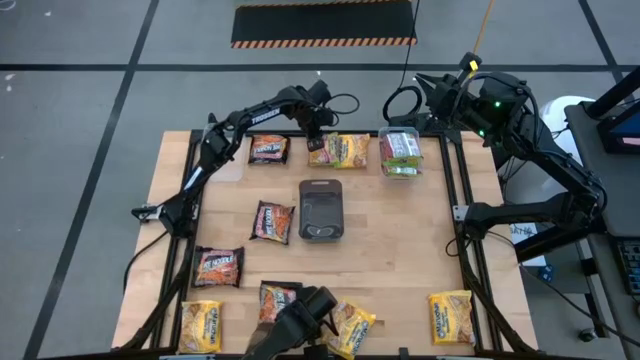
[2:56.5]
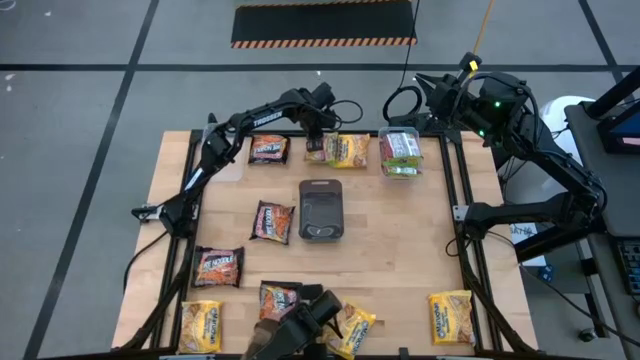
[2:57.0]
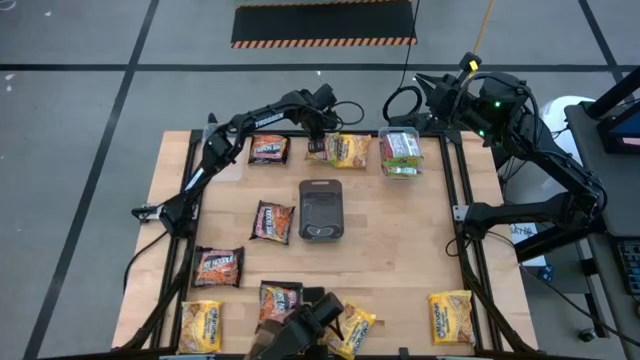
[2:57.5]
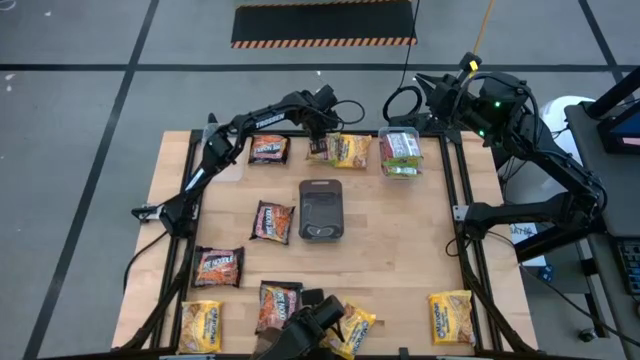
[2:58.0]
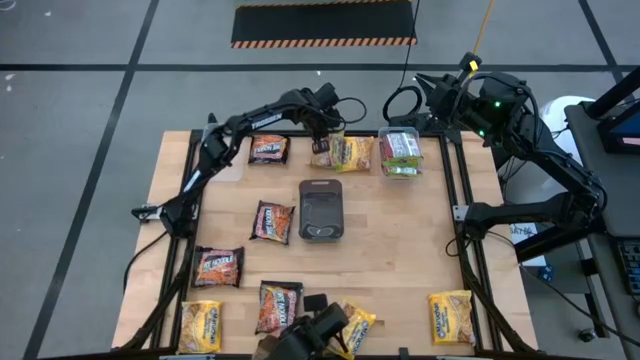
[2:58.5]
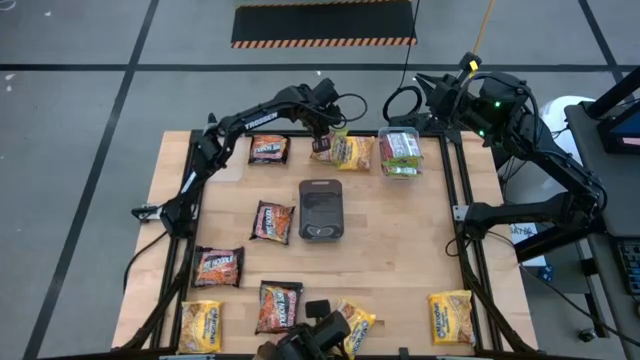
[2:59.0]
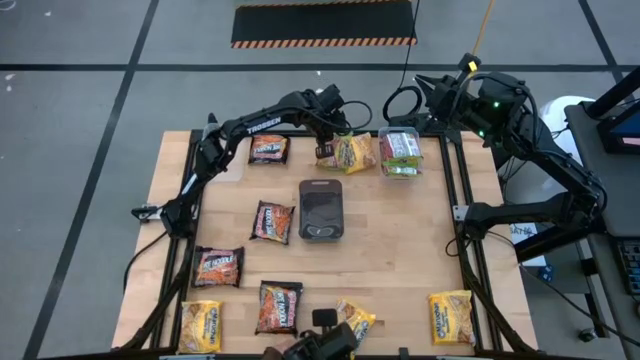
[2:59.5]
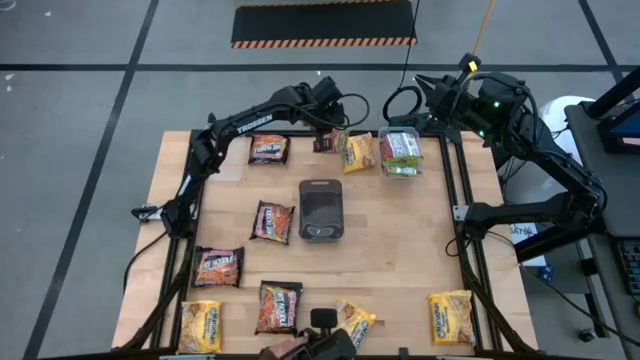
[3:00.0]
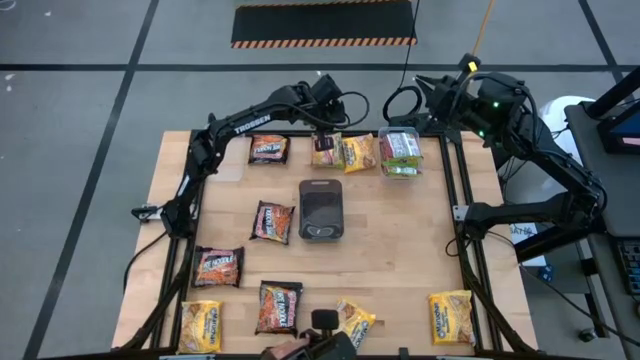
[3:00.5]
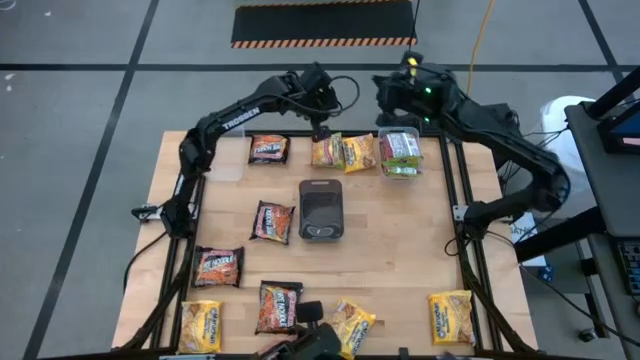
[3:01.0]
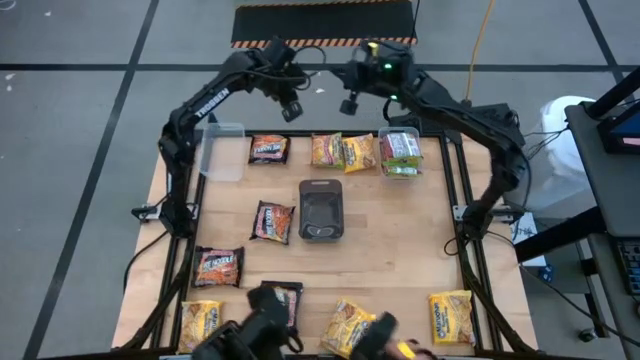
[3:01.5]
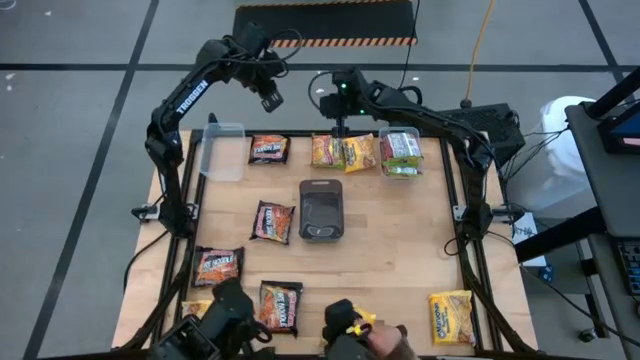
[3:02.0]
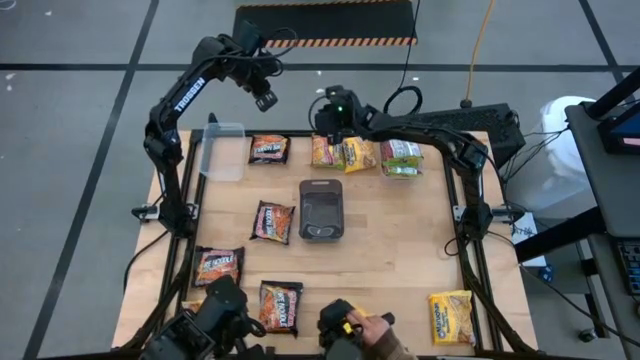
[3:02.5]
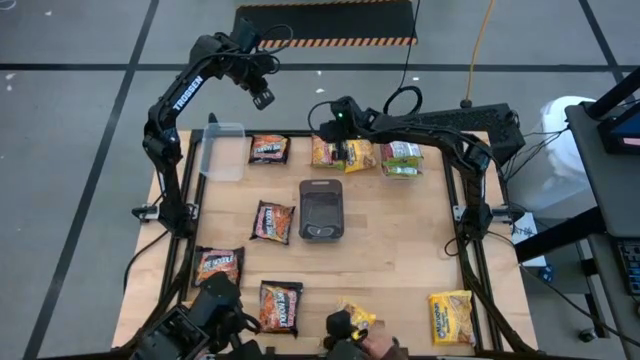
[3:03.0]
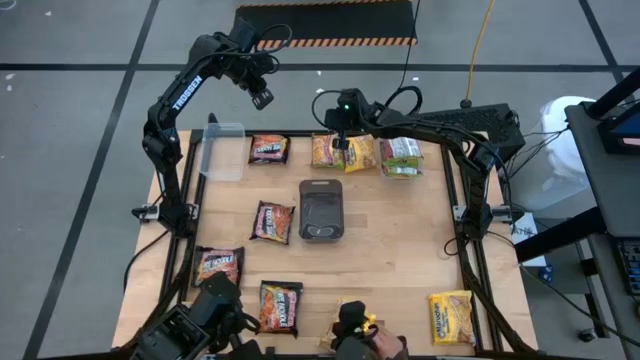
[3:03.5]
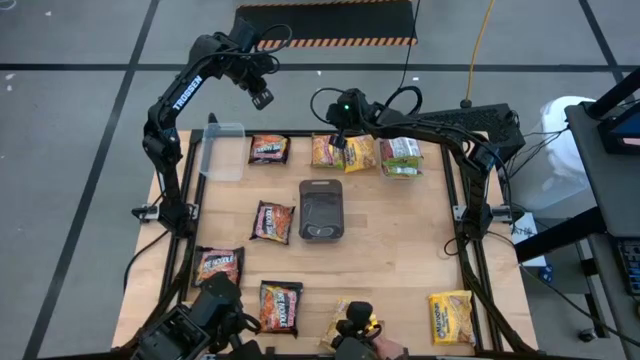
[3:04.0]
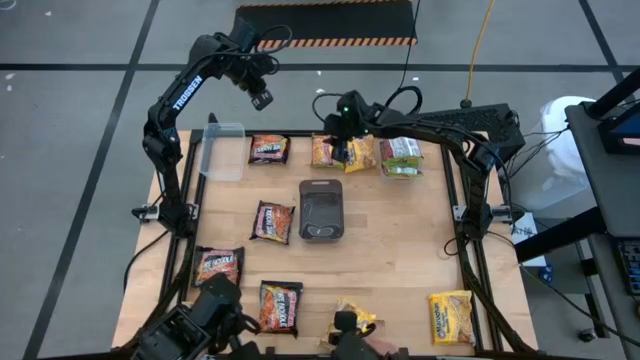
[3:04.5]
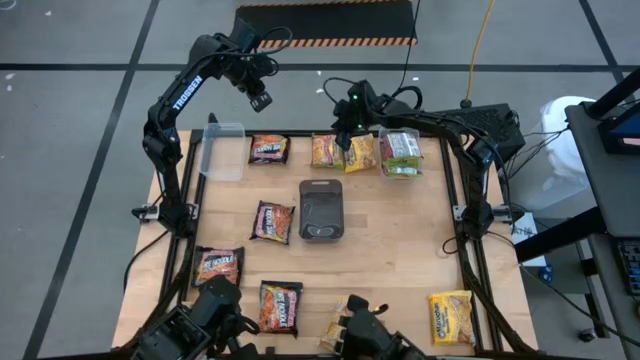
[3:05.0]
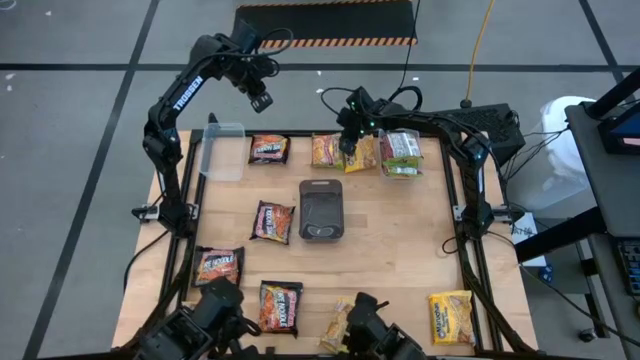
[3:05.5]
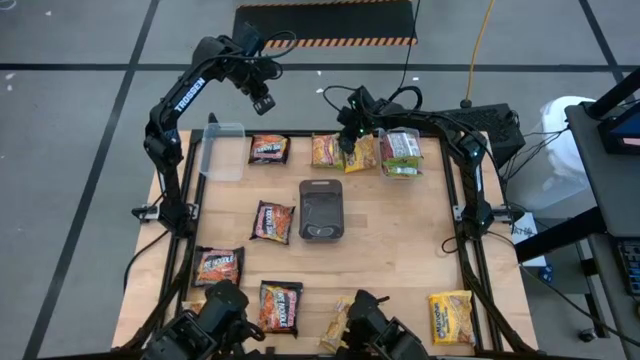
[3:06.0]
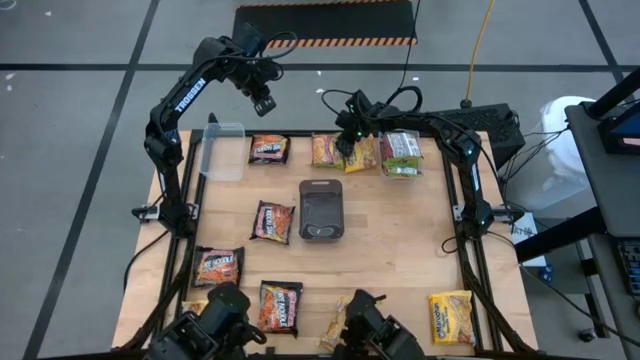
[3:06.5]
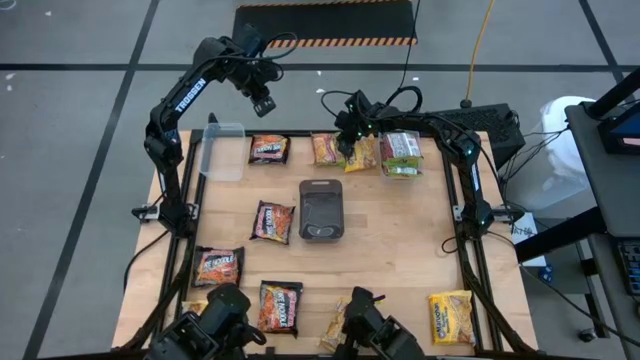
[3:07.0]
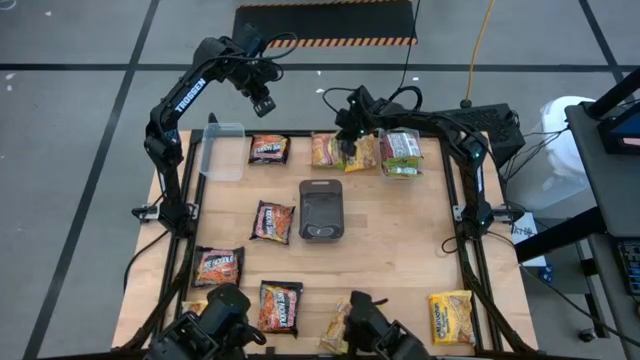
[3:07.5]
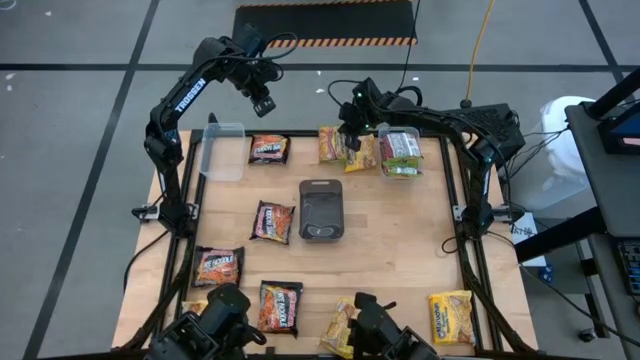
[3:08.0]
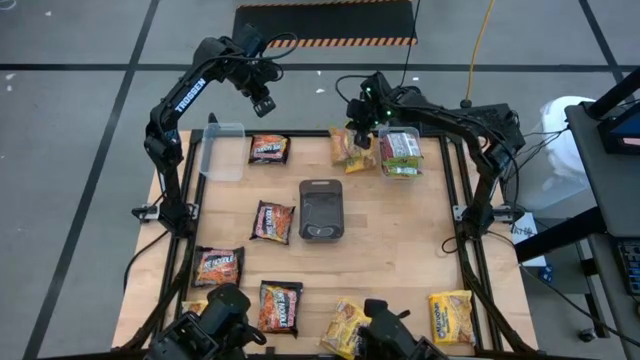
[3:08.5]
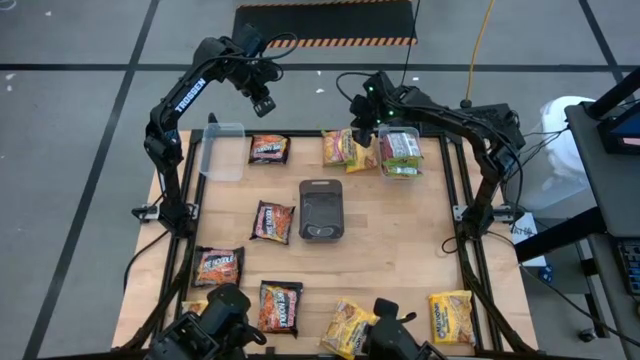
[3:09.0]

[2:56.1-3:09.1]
Task: Sort Maruchan noodles
Put the green noodle pack into the right transparent bin

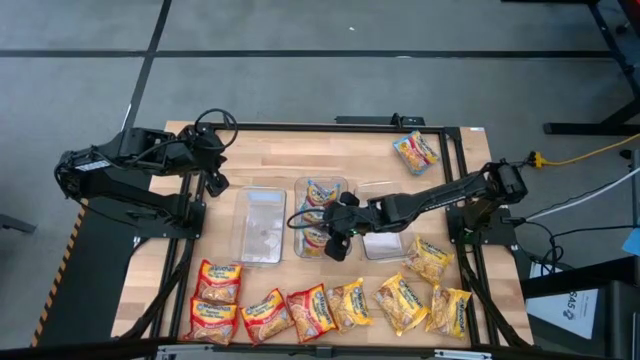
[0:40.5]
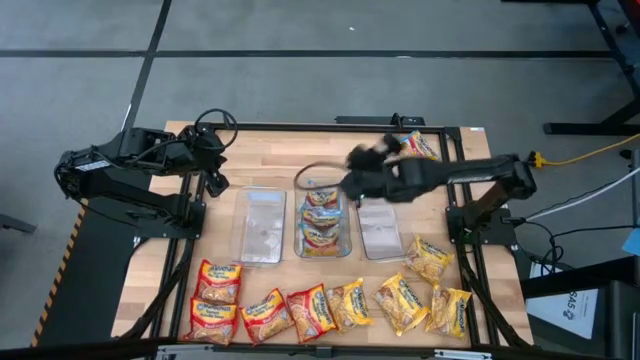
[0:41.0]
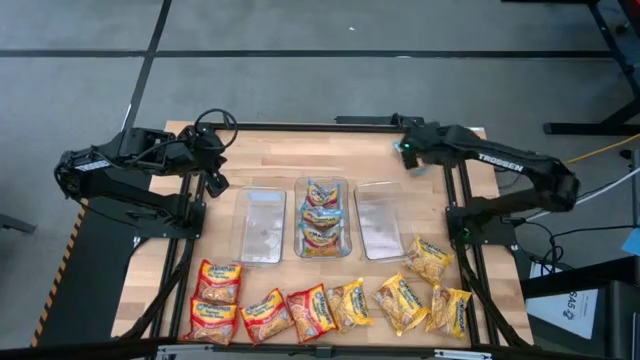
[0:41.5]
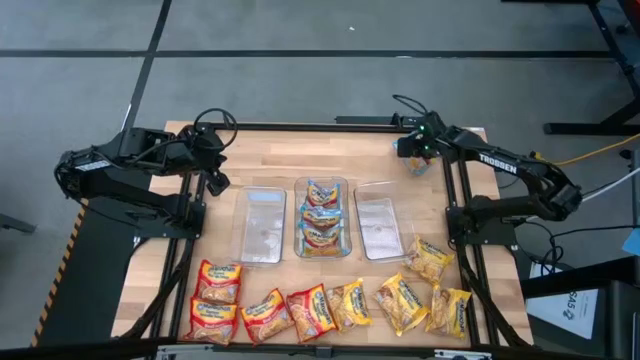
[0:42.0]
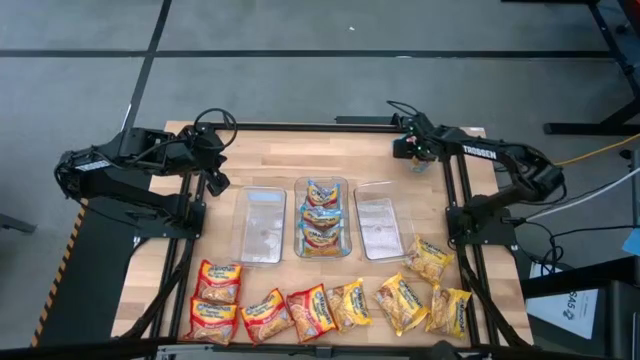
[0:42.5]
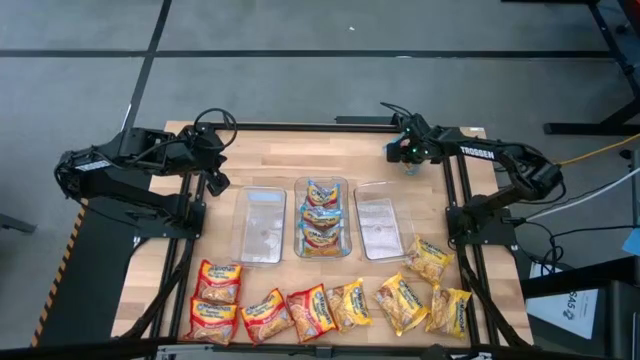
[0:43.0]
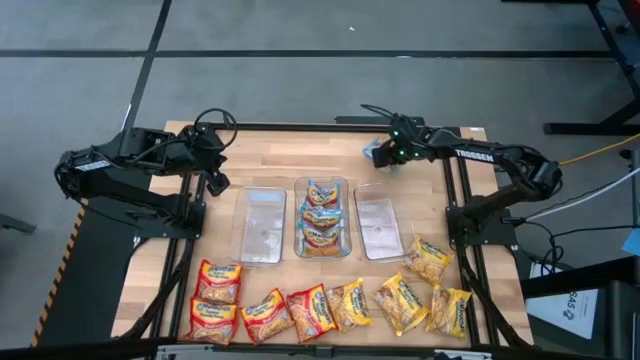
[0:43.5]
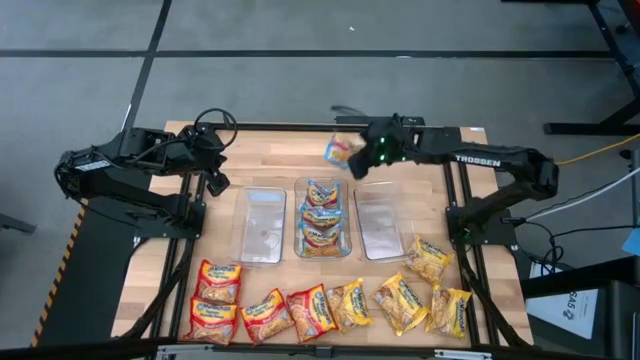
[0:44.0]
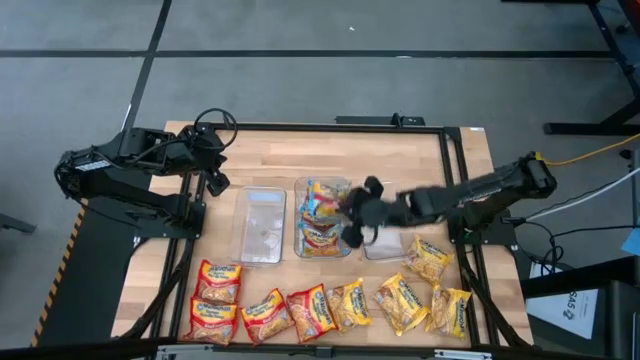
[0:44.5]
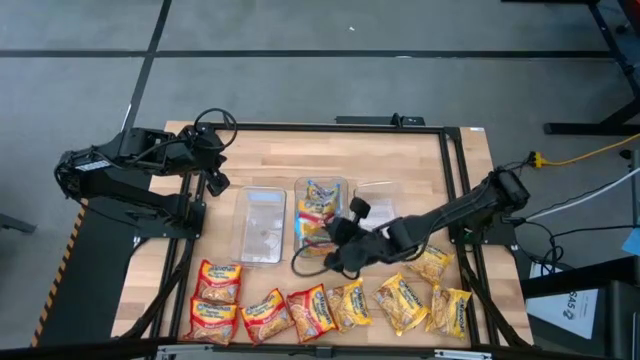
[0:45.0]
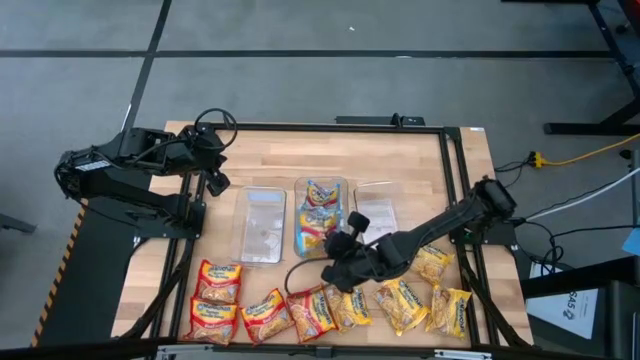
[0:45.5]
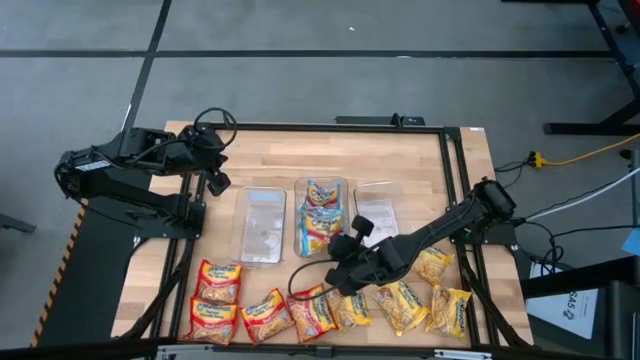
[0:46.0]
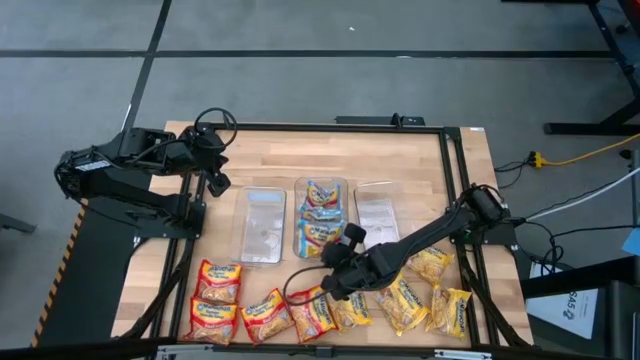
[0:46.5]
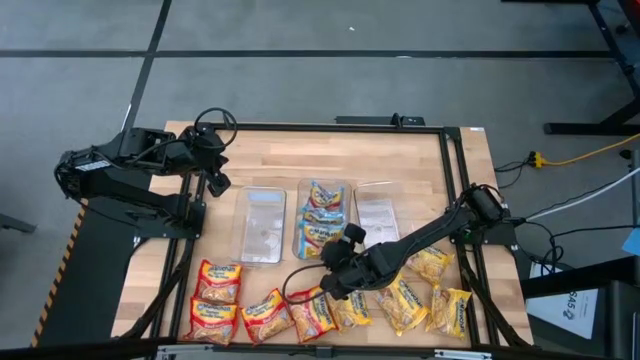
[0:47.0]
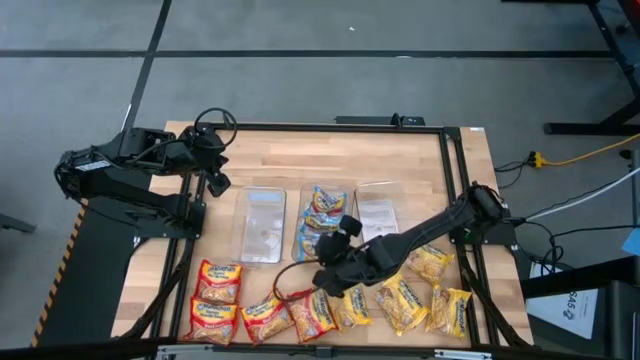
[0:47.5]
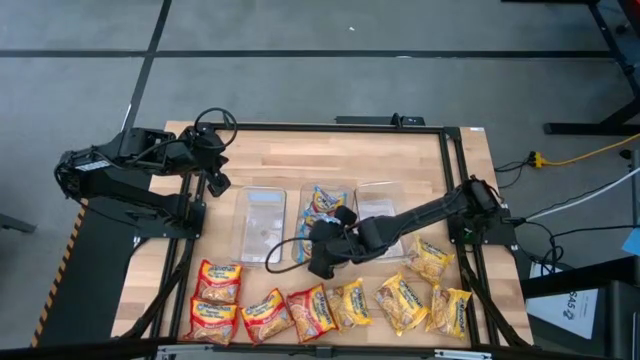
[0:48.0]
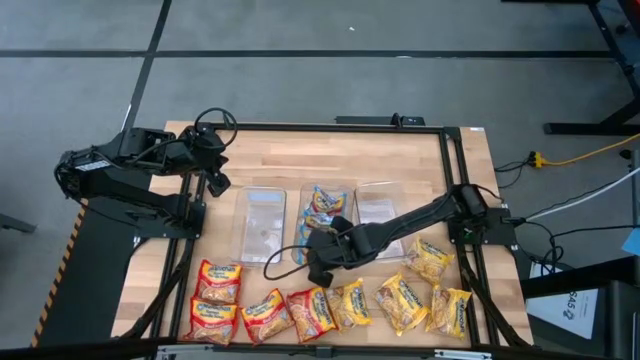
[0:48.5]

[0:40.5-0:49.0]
Task: Sort Maruchan noodles
Put the blue noodle pack into the middle transparent bin
